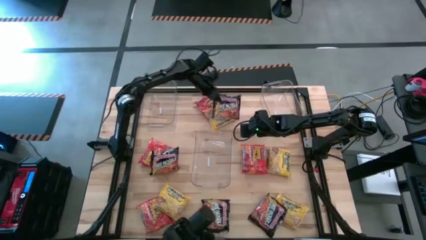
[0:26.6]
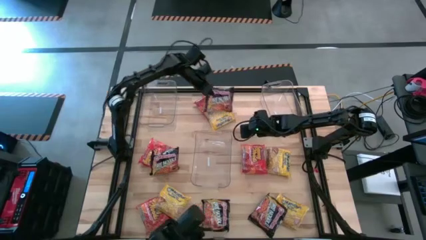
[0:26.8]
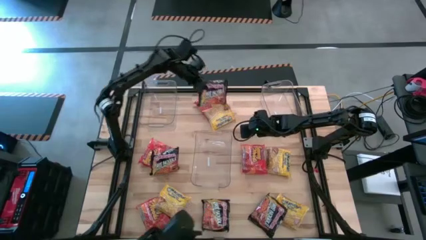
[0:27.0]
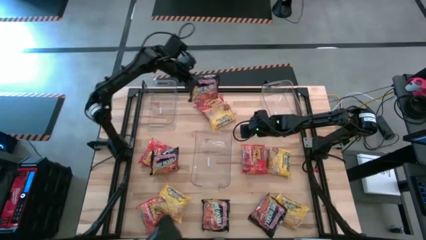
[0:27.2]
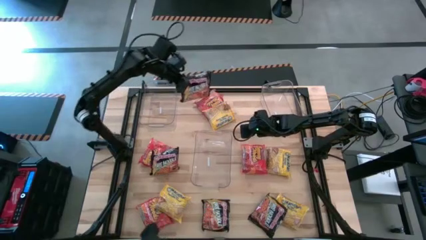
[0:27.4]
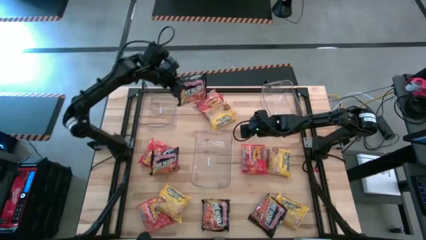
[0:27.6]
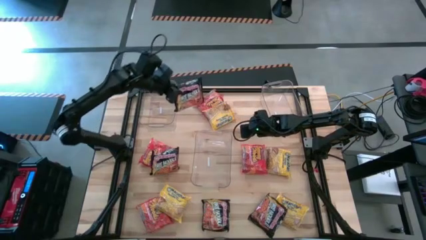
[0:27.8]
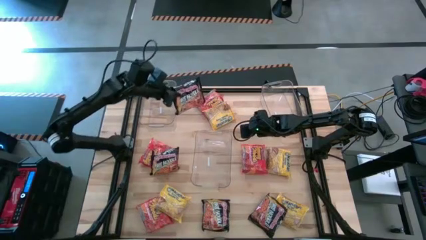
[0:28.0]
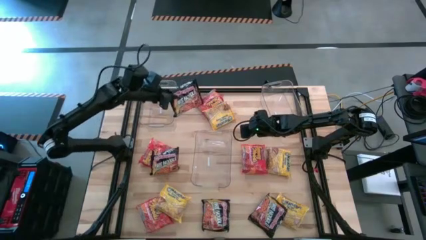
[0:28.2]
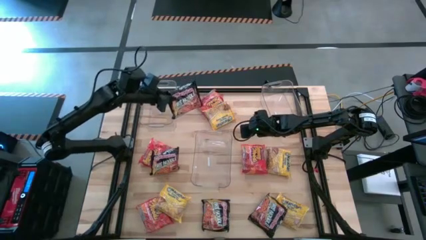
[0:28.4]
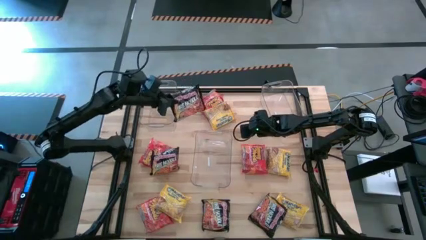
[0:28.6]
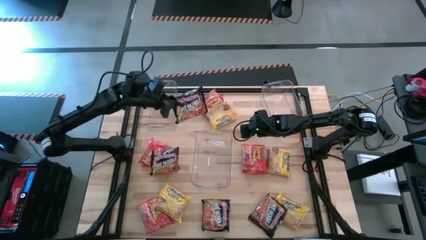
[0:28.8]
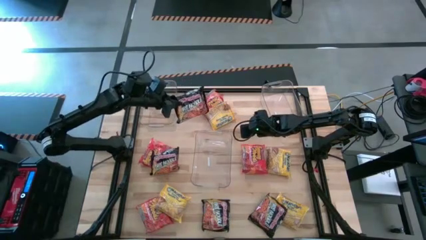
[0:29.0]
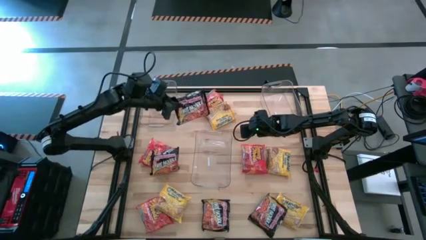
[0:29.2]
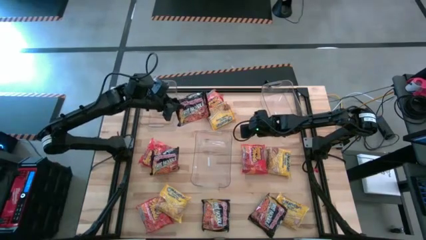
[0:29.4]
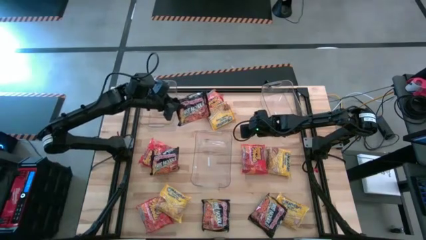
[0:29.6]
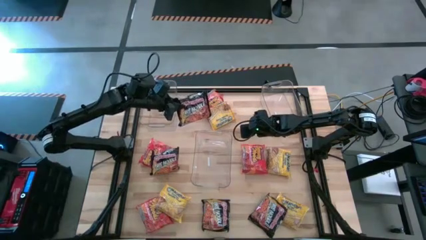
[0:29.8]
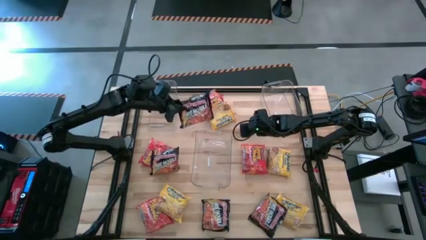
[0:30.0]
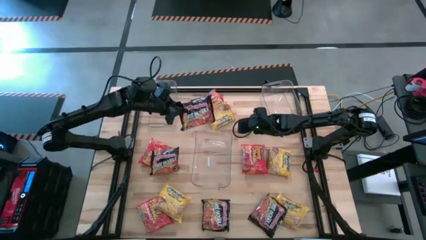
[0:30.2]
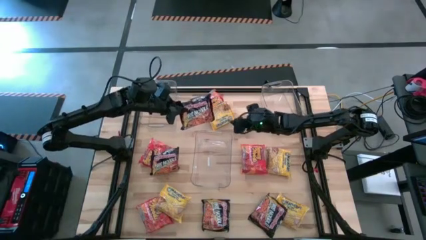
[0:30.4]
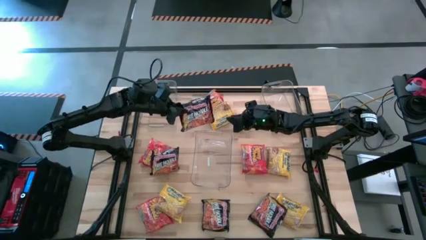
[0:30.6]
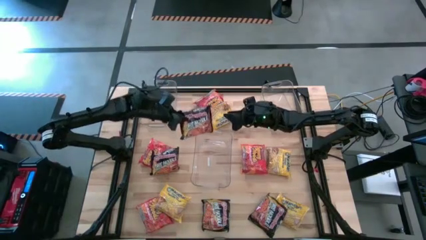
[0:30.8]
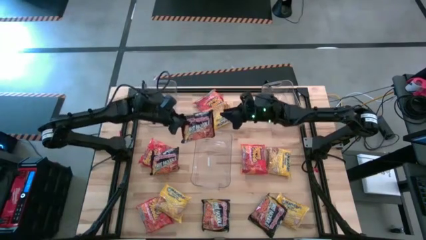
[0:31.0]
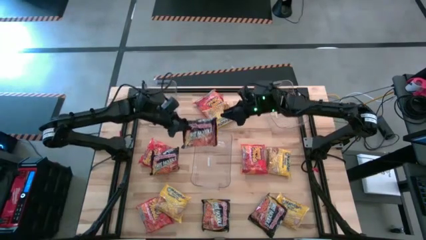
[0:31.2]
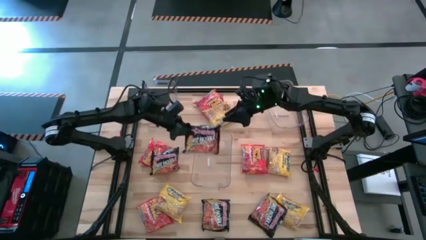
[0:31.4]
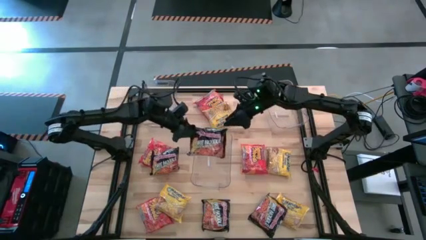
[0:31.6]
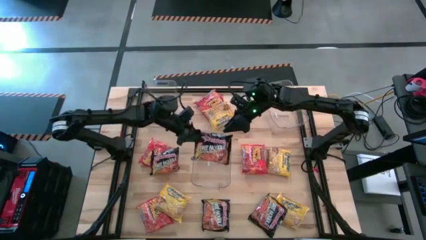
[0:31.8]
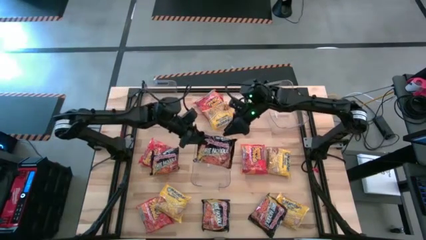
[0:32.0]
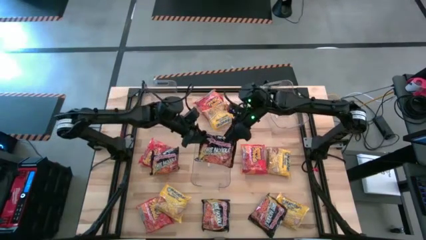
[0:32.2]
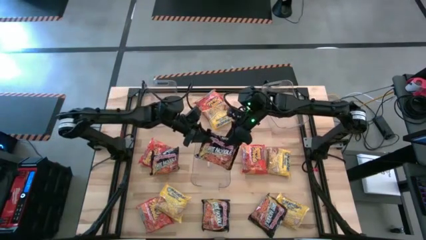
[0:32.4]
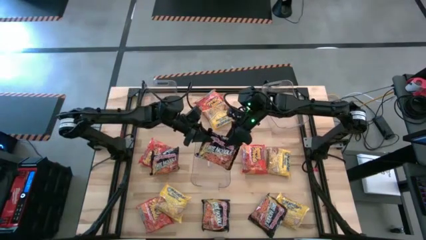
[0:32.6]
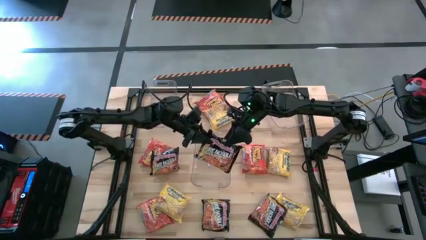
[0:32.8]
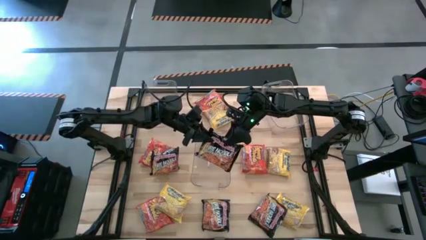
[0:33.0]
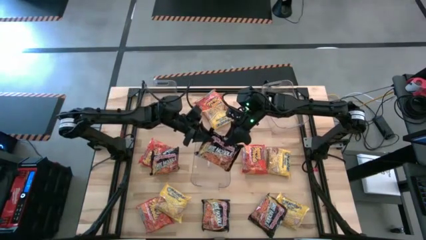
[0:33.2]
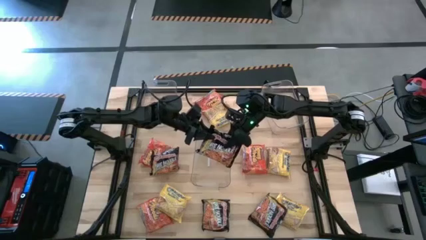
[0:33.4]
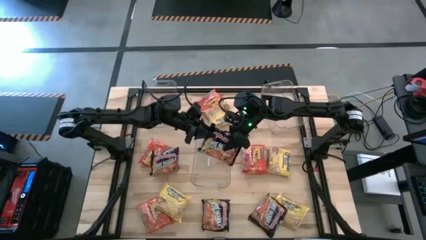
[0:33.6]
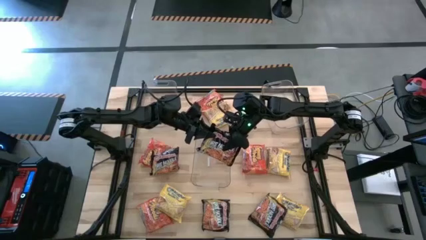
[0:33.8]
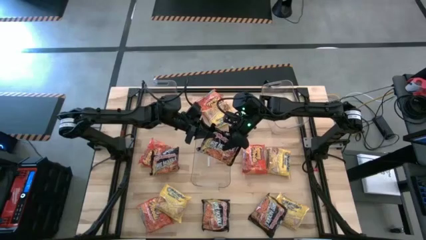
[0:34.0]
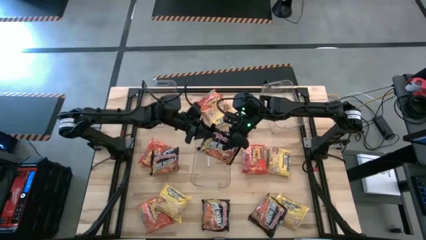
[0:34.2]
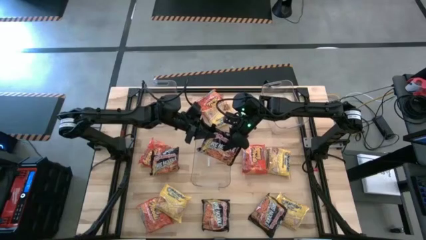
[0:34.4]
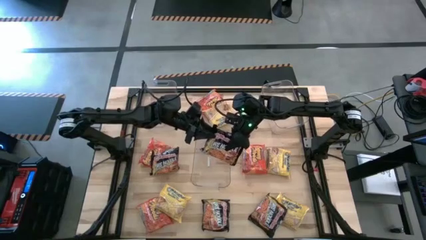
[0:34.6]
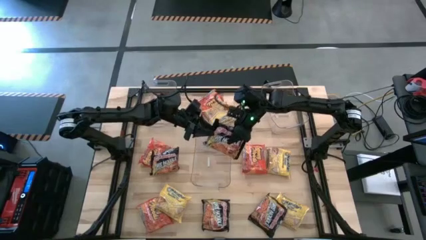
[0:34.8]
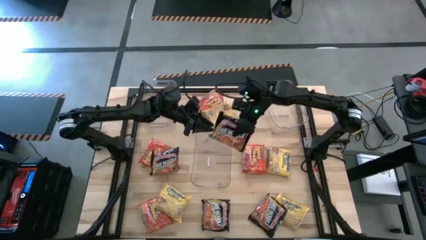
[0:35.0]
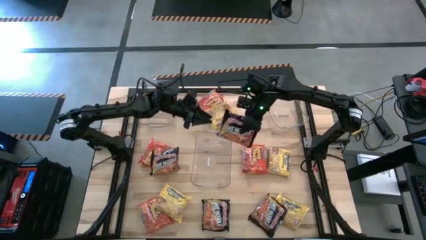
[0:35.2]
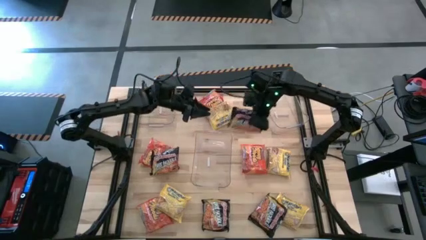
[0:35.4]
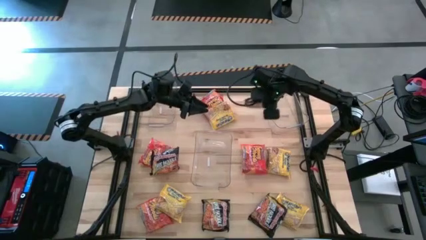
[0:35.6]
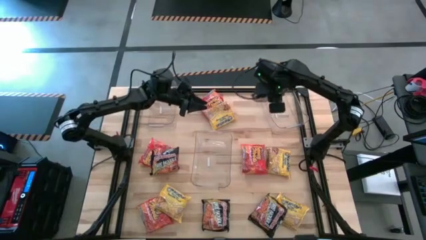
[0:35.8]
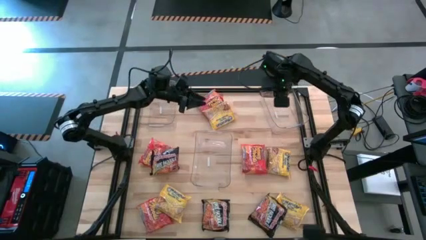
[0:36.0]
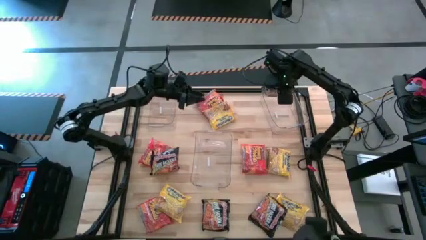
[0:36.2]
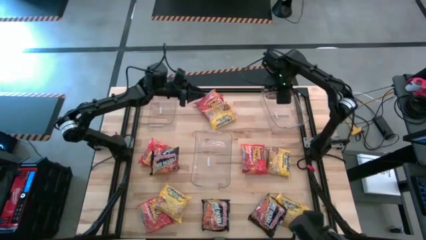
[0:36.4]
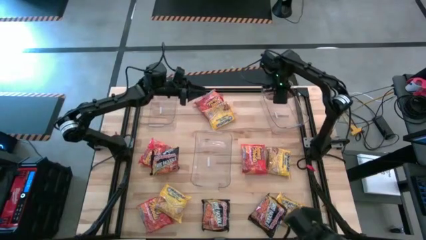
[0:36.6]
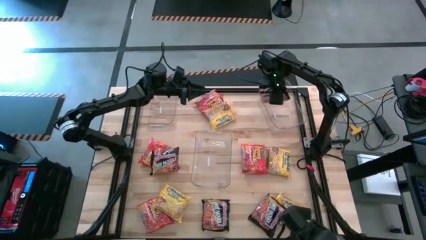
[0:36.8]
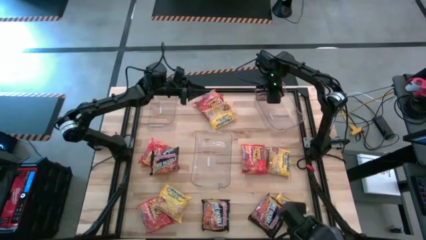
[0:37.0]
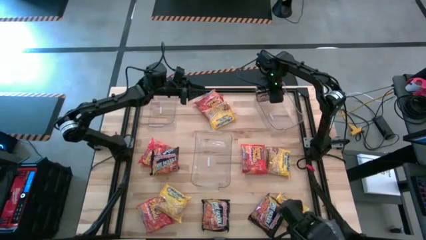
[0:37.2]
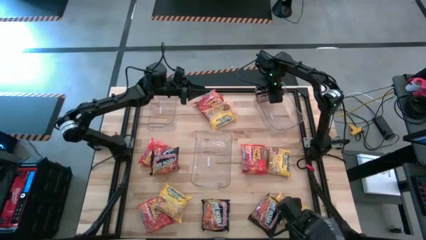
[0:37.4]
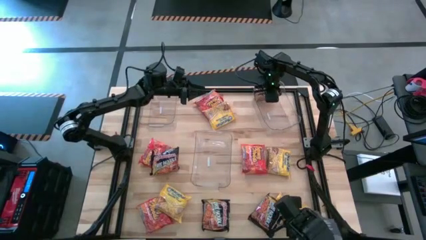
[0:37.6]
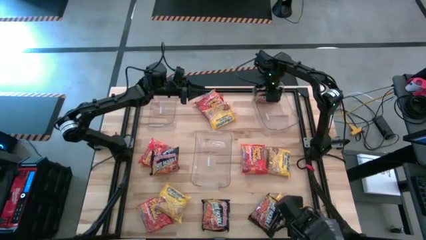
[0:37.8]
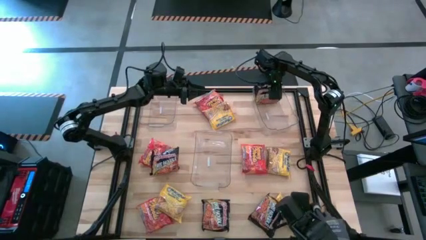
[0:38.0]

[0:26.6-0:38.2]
Task: Sort Maruchan noodles
Put the black noodle pack into the top right transparent bin

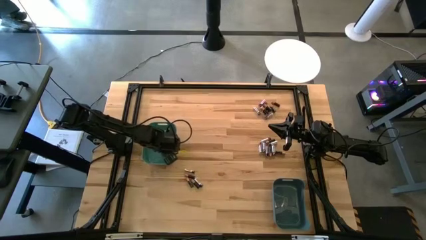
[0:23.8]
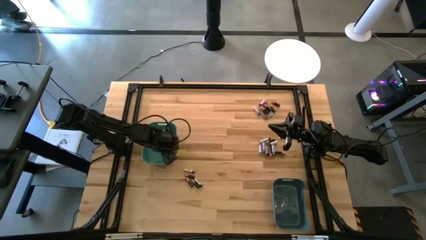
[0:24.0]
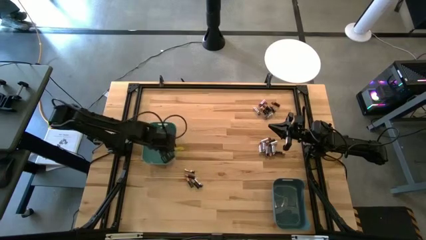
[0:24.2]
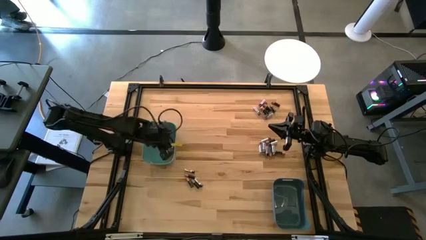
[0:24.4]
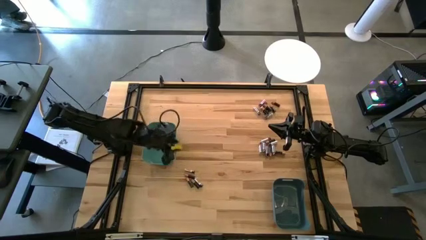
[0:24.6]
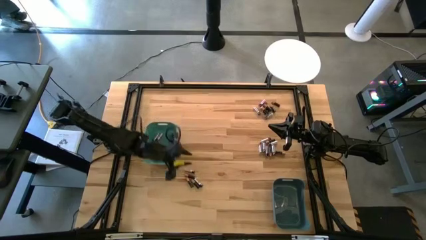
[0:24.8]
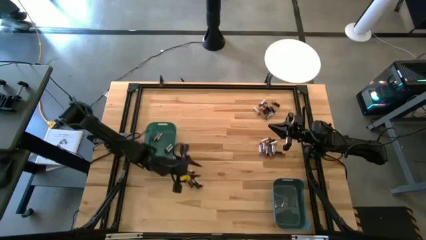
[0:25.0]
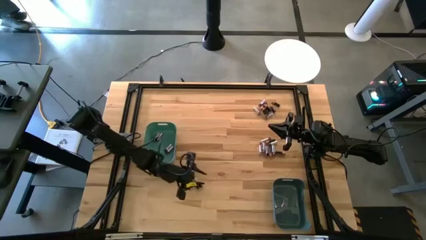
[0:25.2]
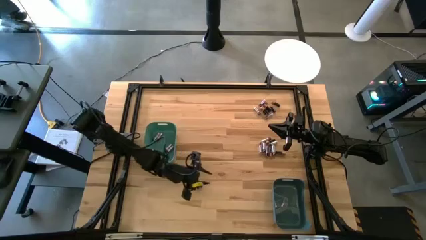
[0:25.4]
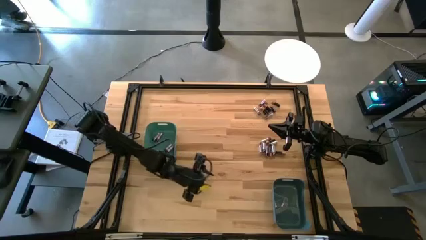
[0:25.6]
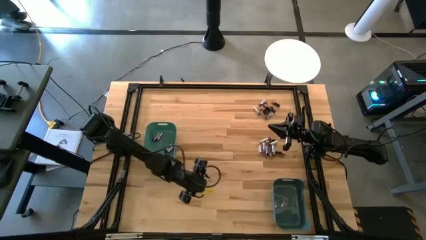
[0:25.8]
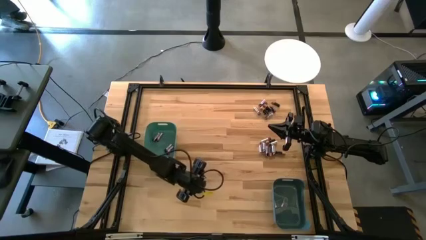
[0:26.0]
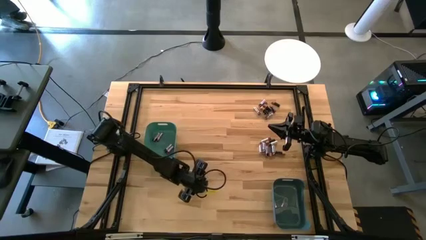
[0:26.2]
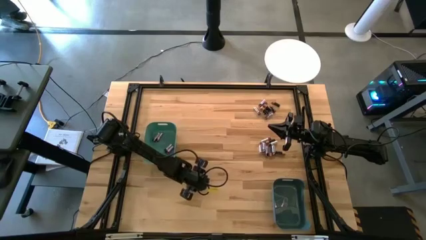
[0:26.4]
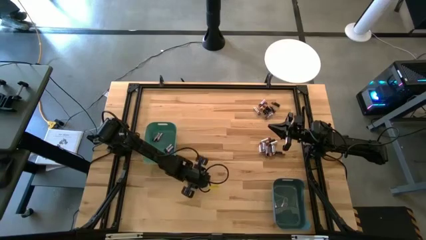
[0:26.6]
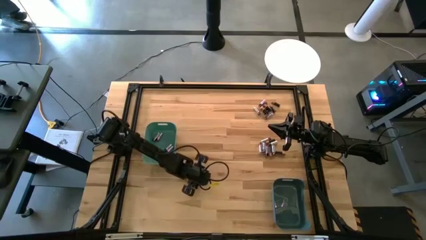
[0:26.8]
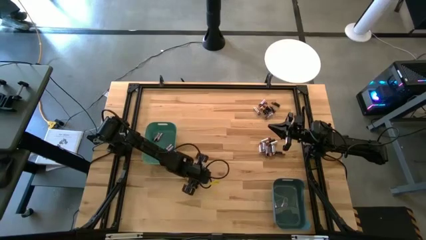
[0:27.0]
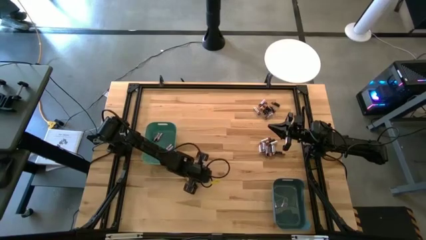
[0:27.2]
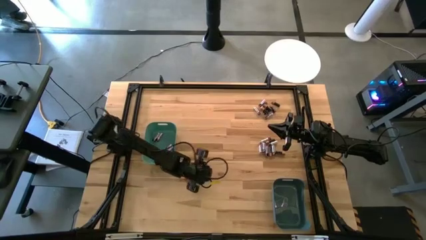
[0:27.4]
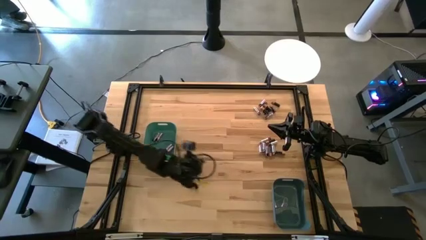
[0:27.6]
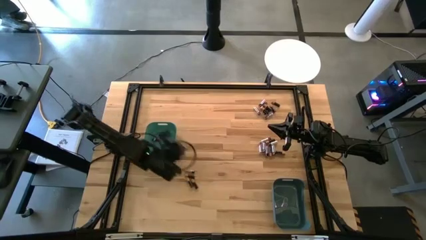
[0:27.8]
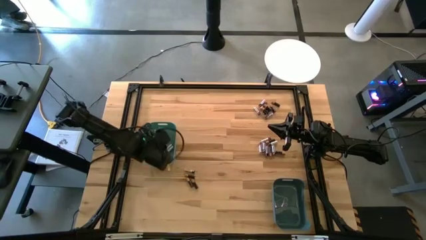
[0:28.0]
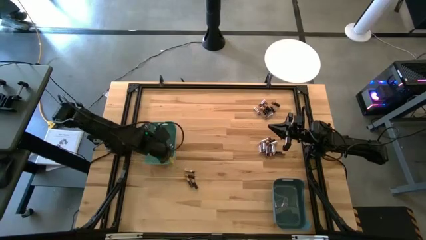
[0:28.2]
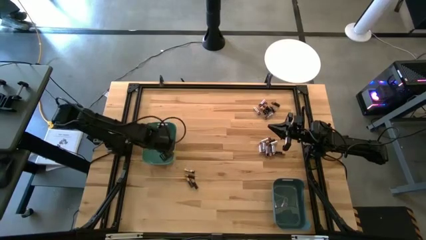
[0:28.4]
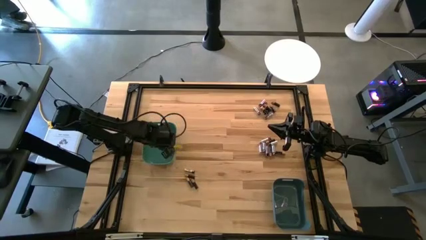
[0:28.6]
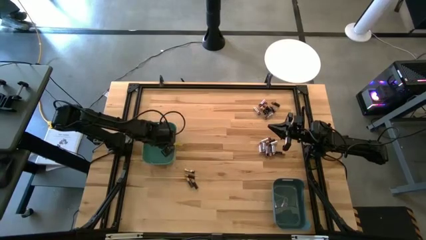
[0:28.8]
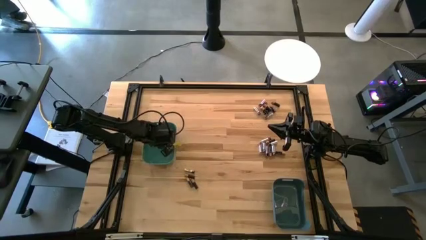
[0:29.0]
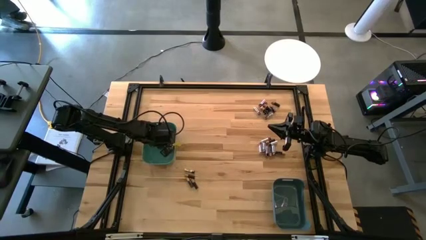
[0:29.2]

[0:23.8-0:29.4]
Task: Sort batteries
Put the silver battery into the green bin
